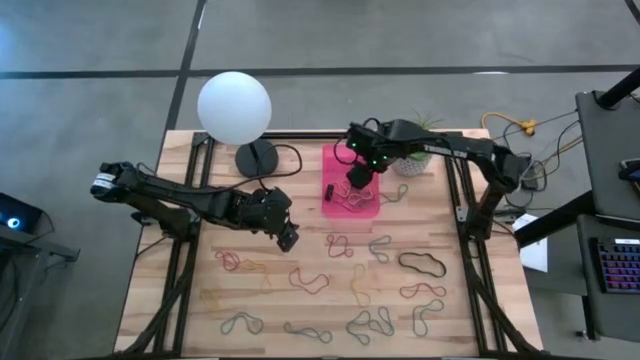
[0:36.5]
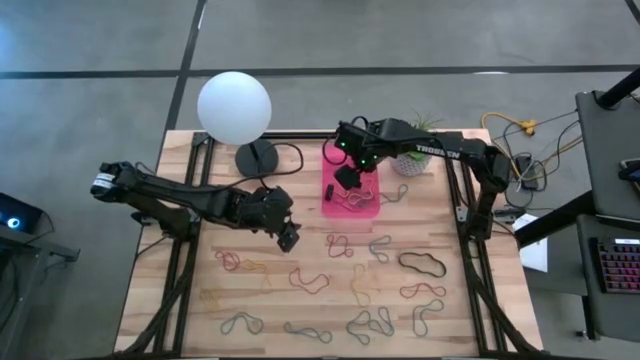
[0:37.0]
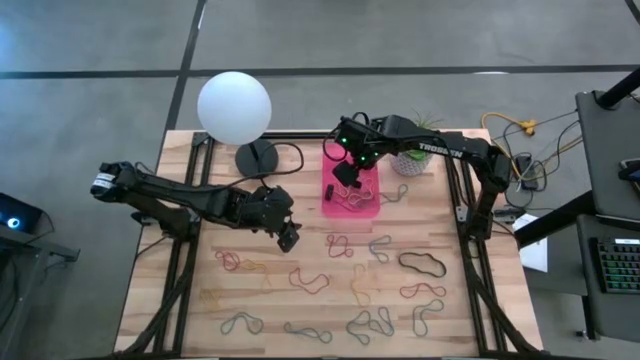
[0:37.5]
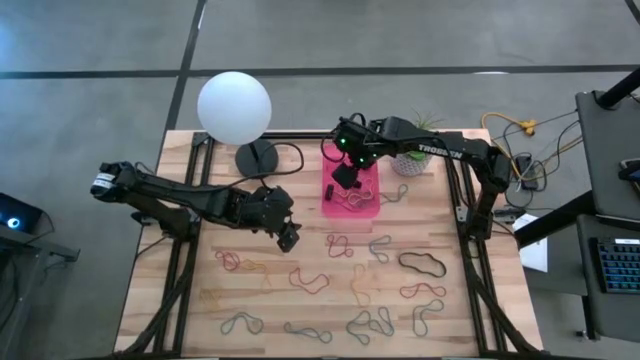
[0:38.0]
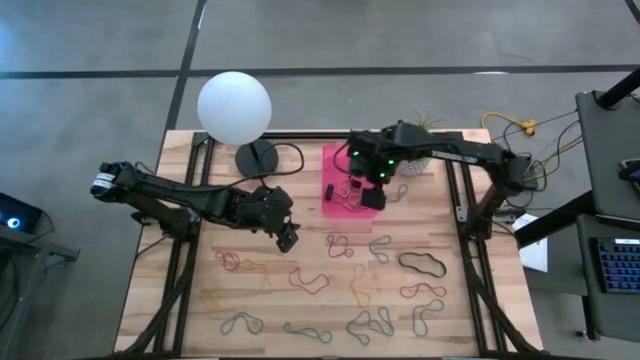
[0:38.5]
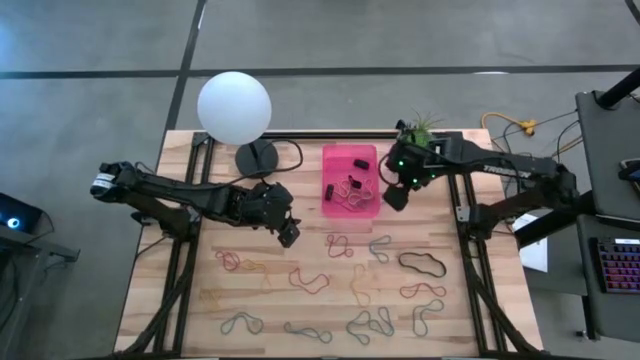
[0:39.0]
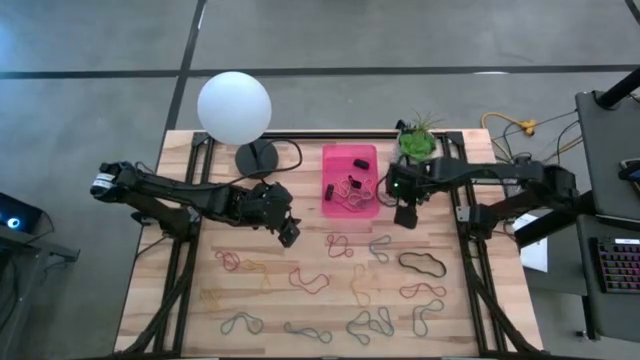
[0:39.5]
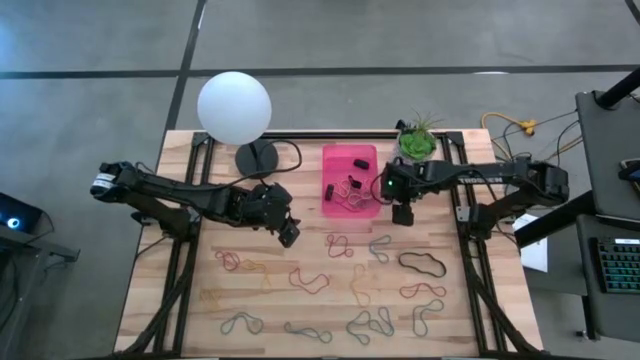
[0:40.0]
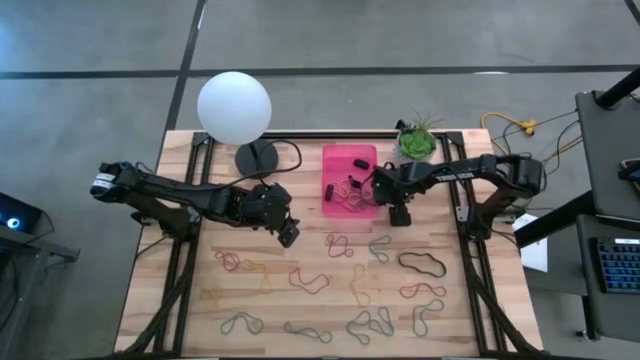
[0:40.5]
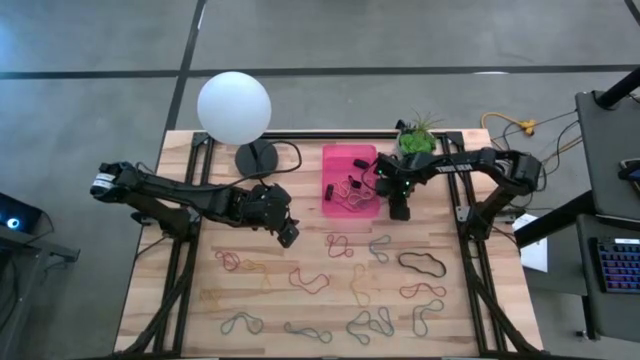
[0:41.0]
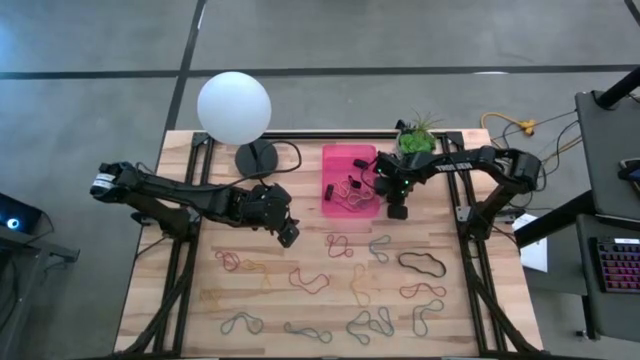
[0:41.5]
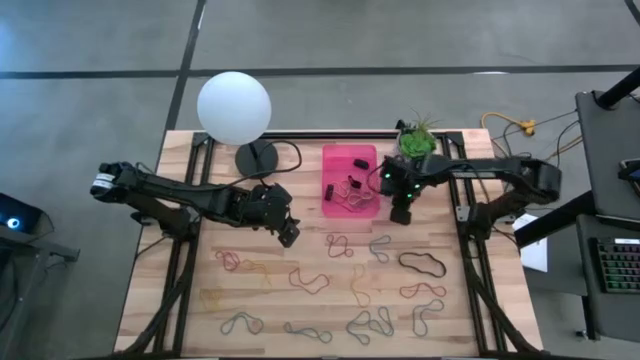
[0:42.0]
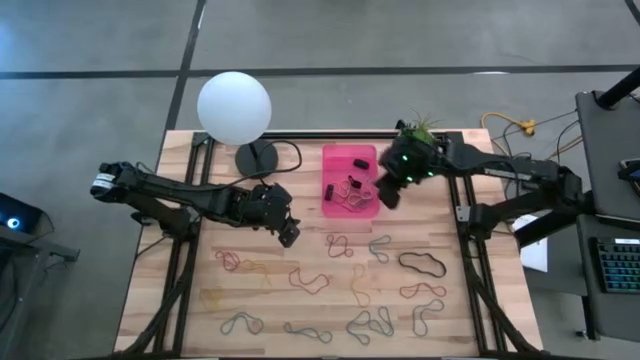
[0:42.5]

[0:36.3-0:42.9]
Task: Pick and place rubber bands into bin
Put the blue rubber band into the pink bin

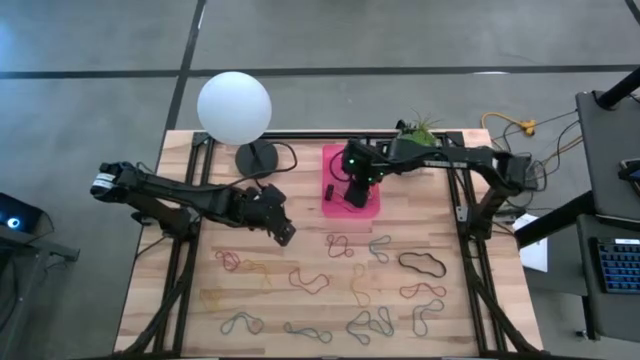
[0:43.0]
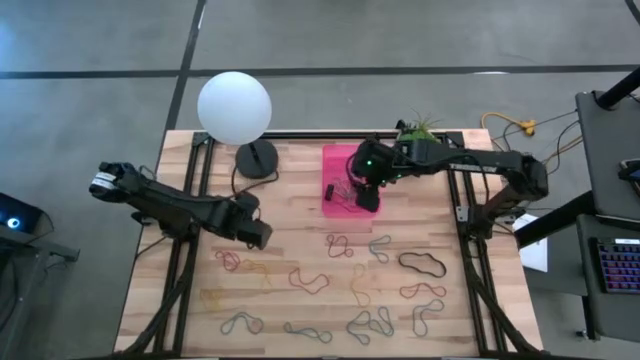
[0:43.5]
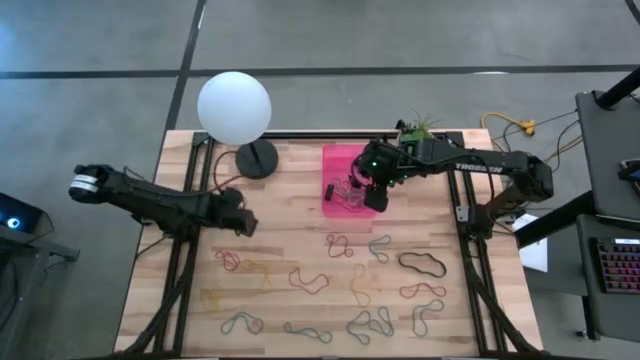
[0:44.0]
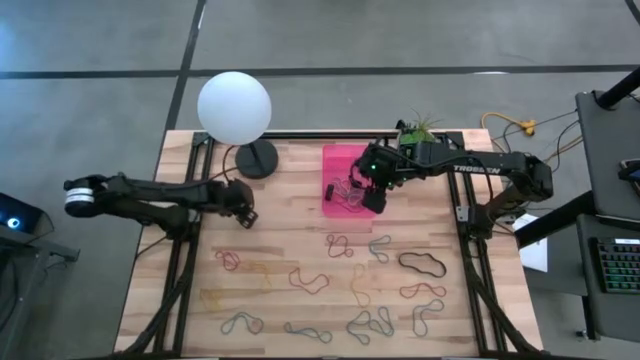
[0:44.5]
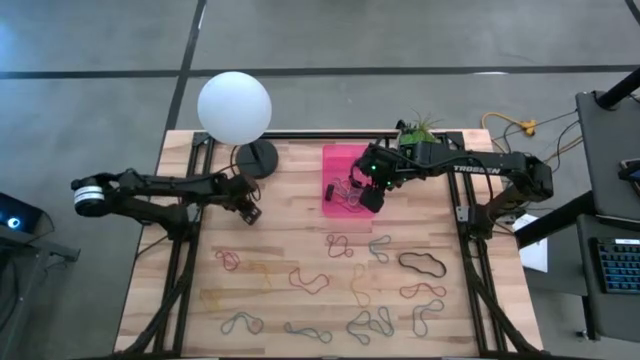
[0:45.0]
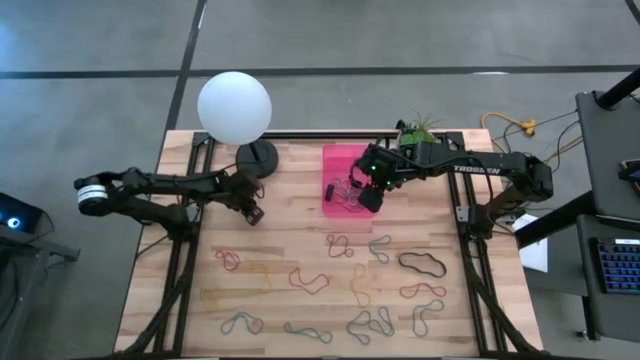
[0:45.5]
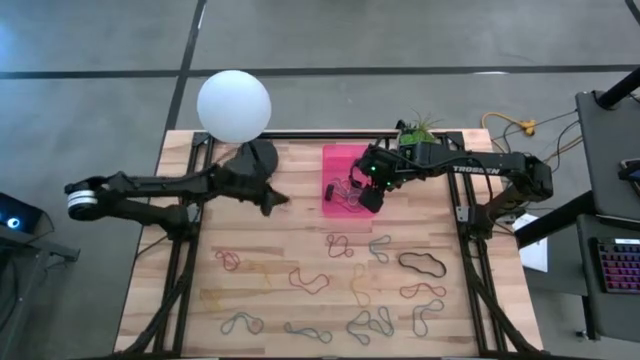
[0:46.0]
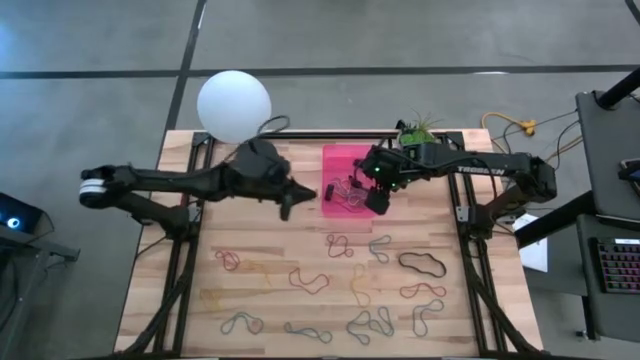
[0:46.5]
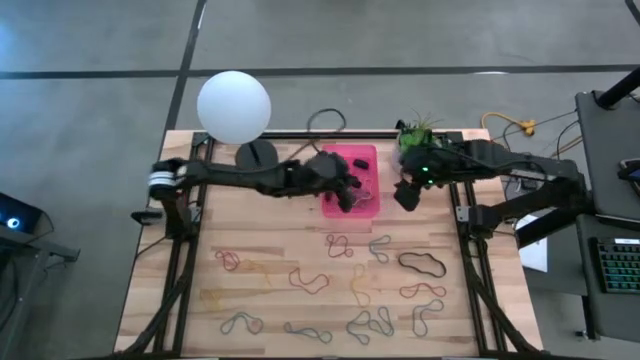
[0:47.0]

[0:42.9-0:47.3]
Put the red rubber band into the pink bin

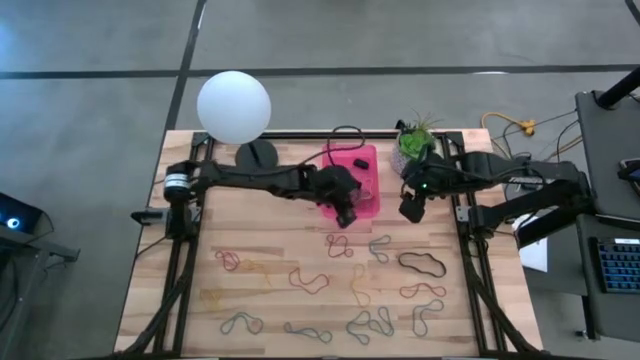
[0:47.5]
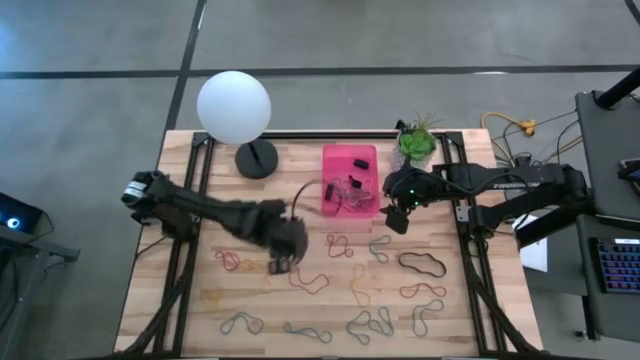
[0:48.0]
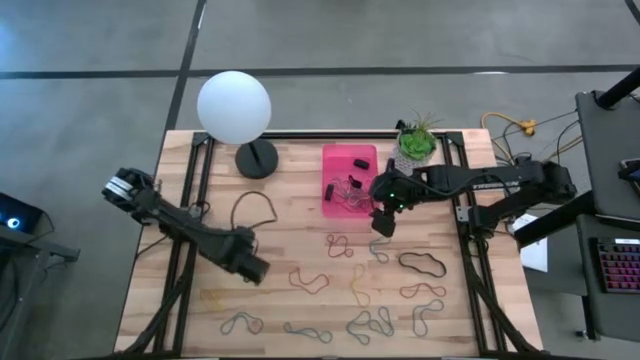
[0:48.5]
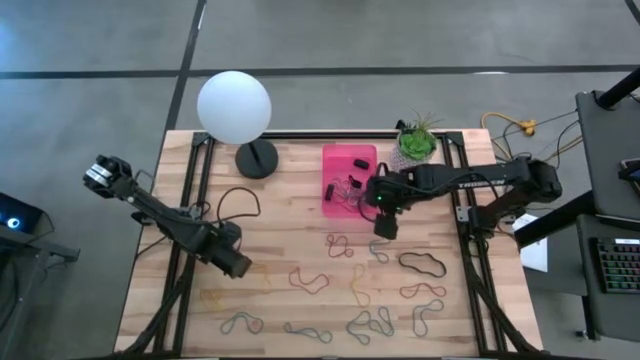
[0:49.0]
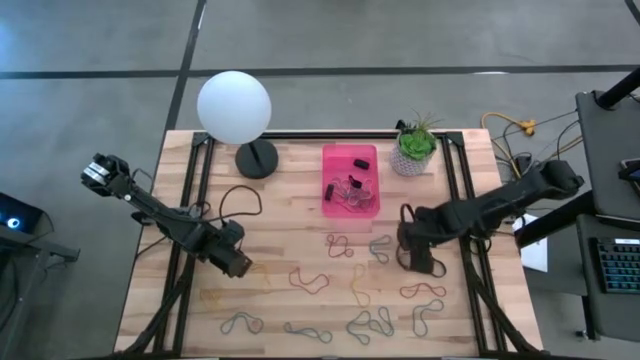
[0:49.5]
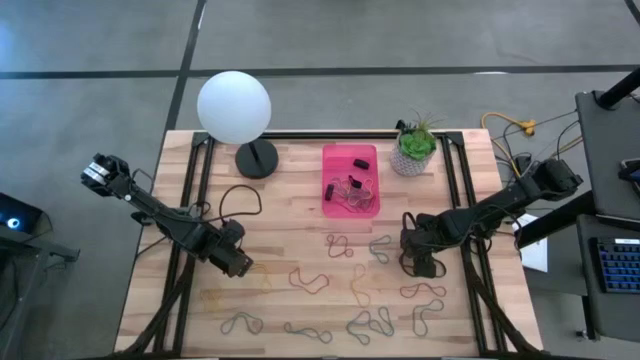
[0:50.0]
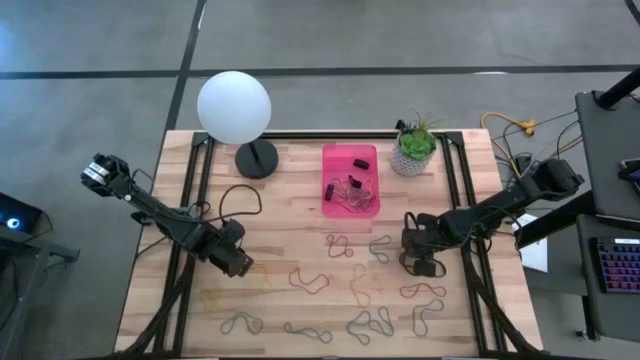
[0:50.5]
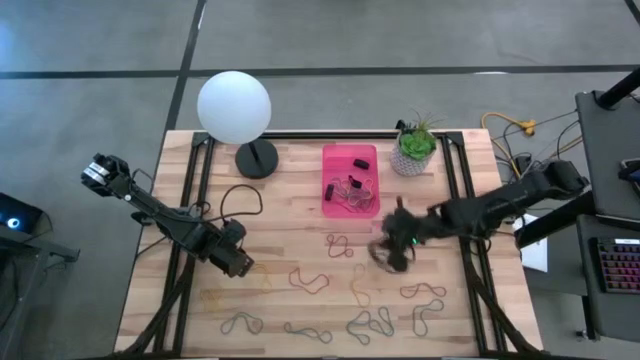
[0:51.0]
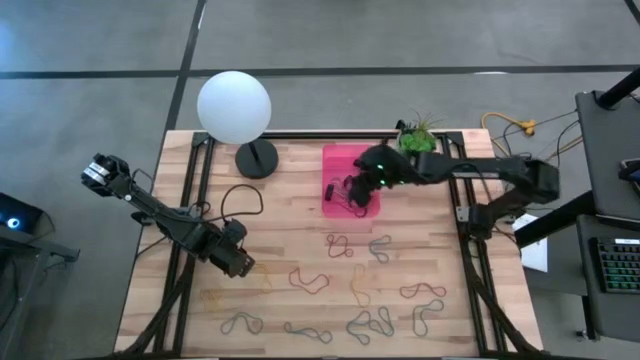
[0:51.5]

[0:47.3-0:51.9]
Put the black rubber band into the pink bin

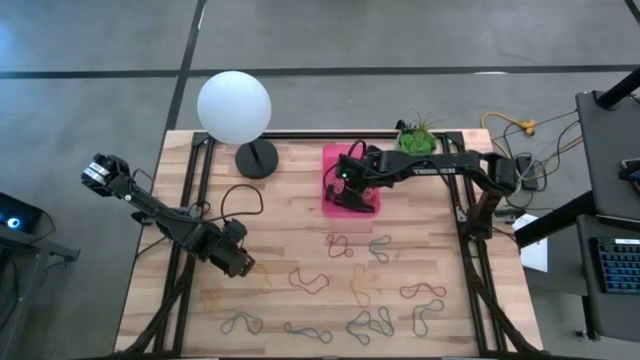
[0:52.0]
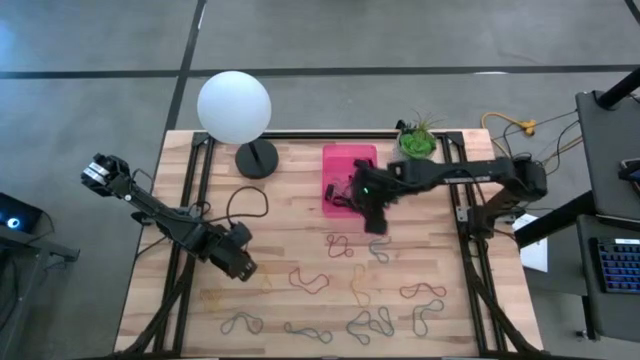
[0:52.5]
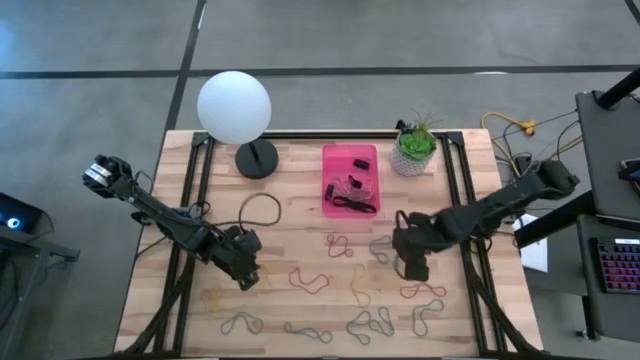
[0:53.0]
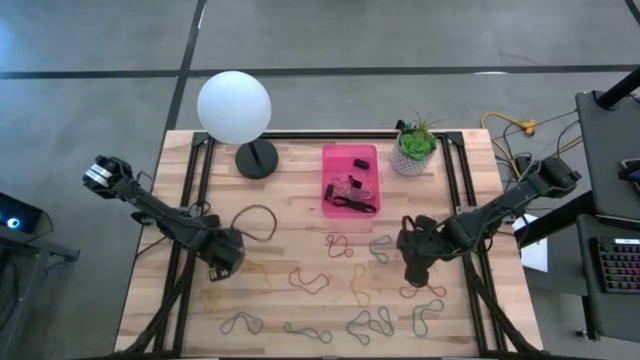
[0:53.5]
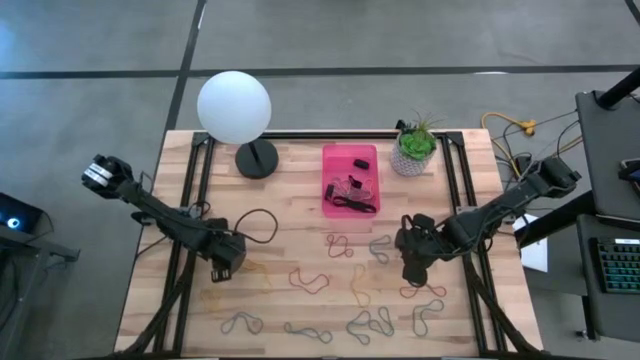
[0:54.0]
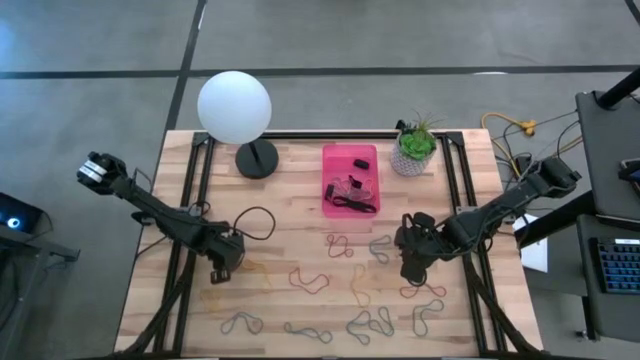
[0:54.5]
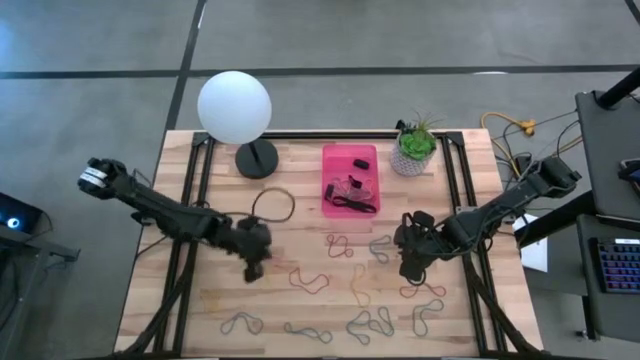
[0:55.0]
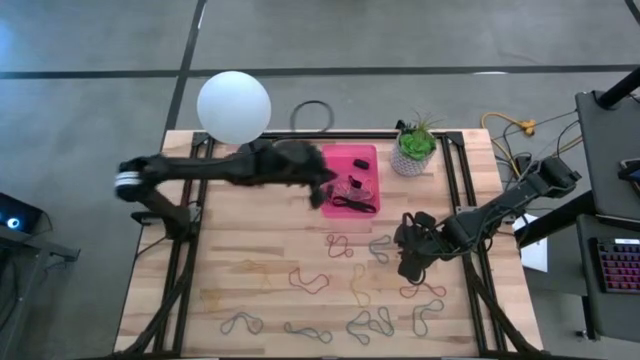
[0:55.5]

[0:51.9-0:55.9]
Put the red rubber band into the pink bin

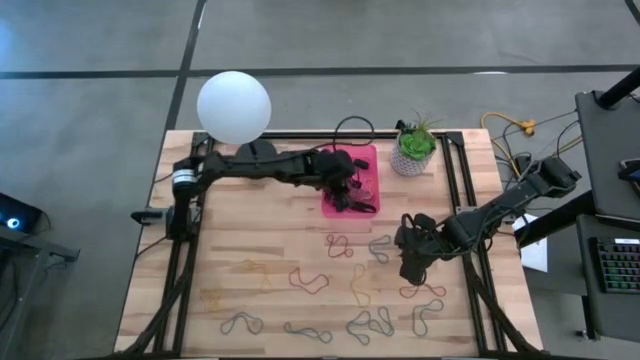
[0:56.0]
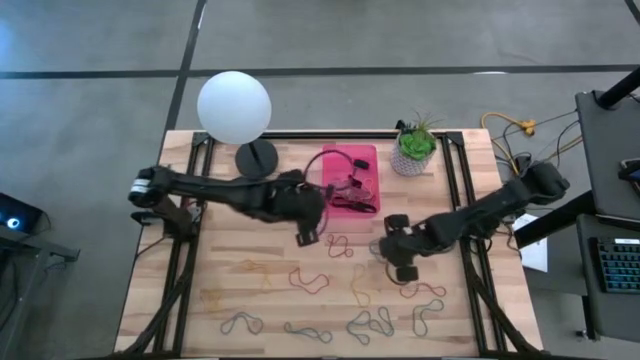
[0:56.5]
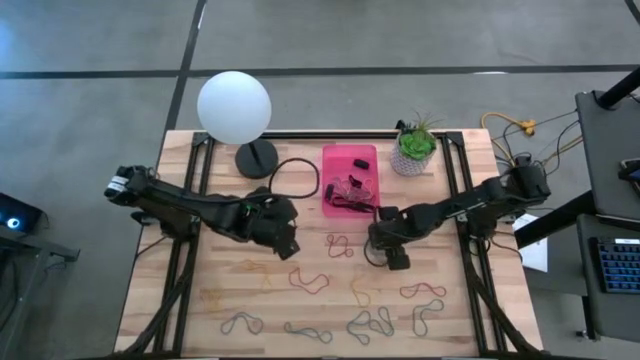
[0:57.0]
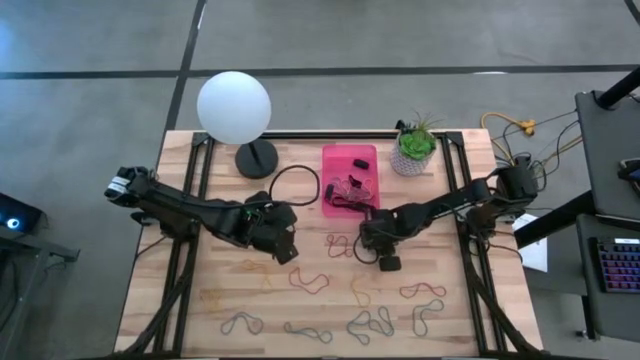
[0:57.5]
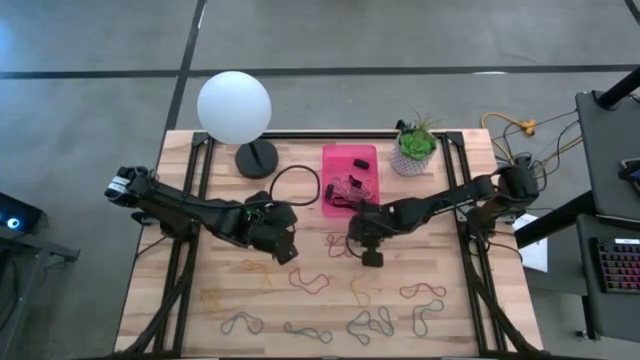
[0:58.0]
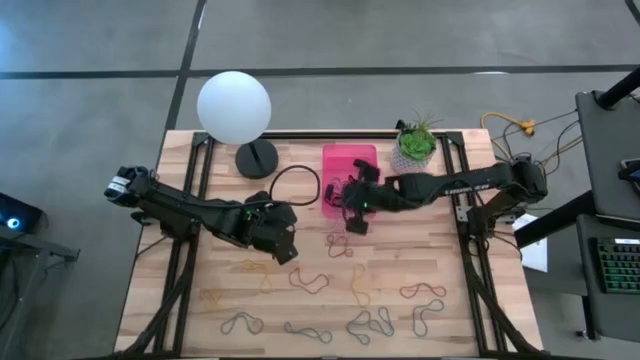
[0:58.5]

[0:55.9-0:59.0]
Put the blue rubber band into the pink bin
